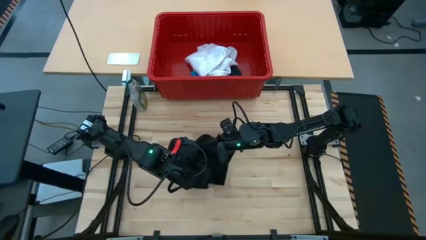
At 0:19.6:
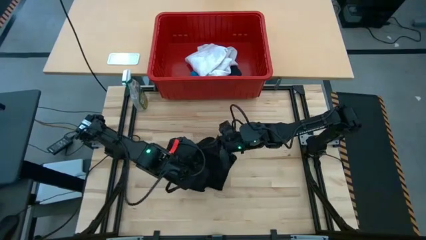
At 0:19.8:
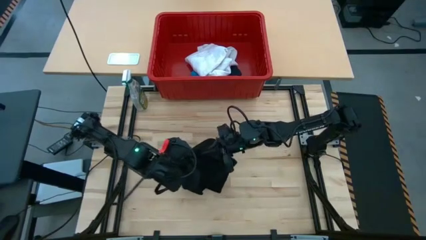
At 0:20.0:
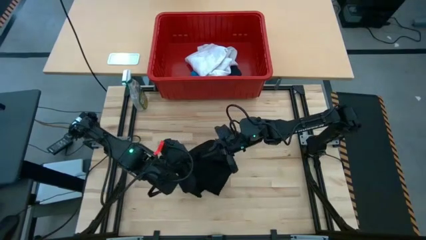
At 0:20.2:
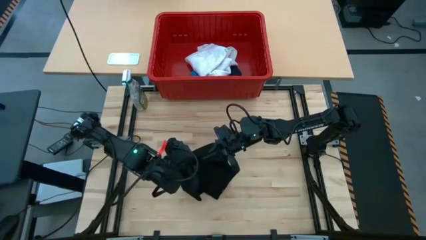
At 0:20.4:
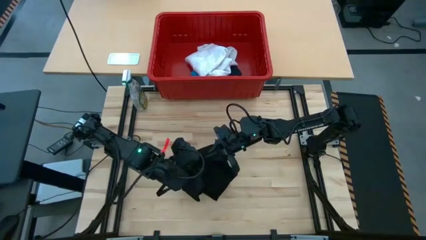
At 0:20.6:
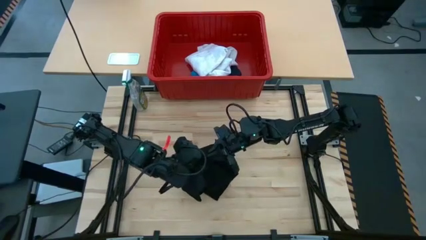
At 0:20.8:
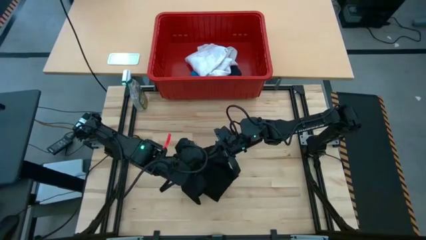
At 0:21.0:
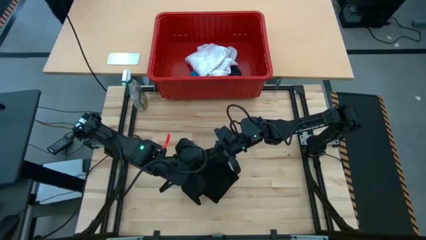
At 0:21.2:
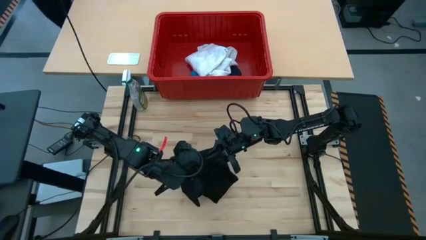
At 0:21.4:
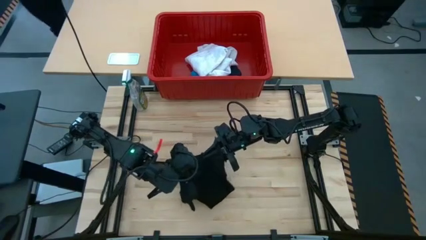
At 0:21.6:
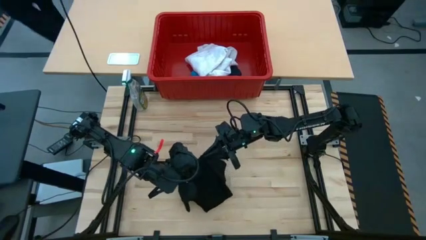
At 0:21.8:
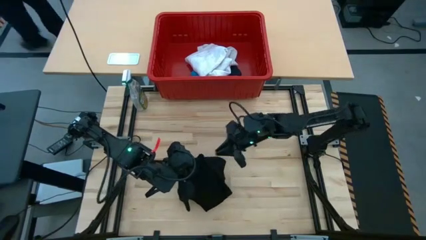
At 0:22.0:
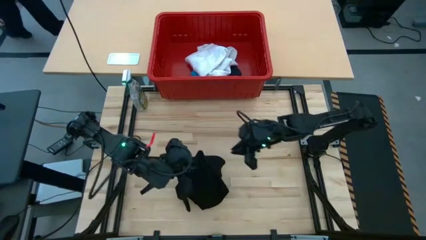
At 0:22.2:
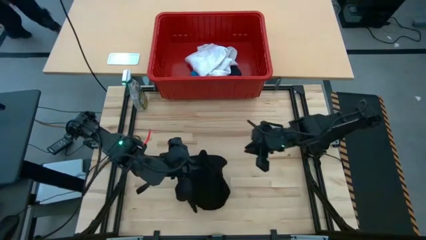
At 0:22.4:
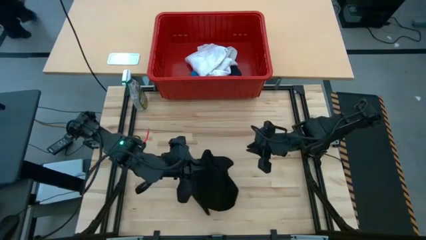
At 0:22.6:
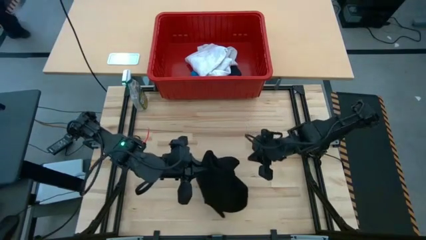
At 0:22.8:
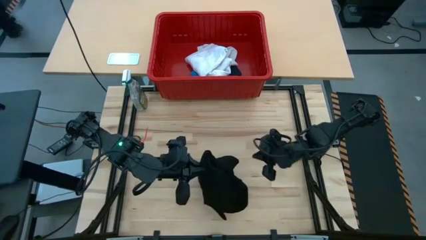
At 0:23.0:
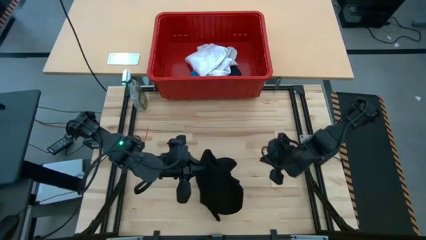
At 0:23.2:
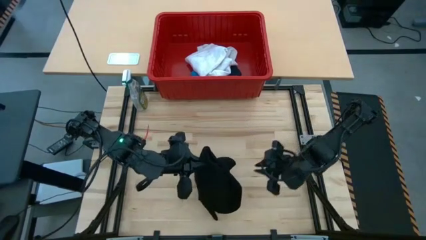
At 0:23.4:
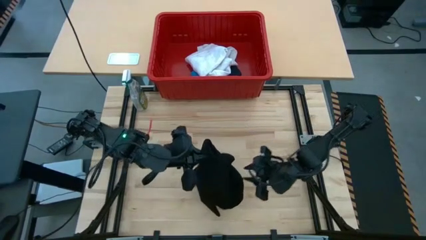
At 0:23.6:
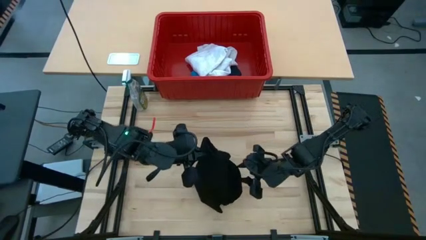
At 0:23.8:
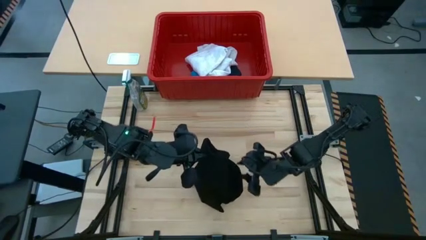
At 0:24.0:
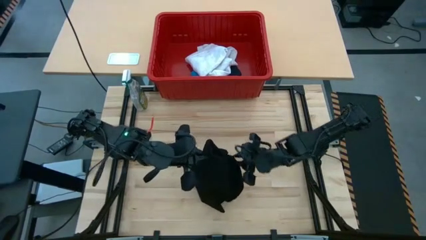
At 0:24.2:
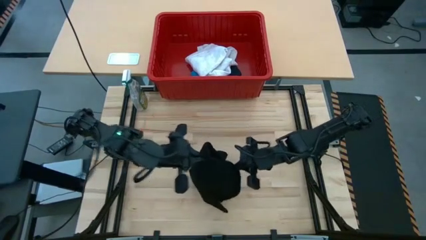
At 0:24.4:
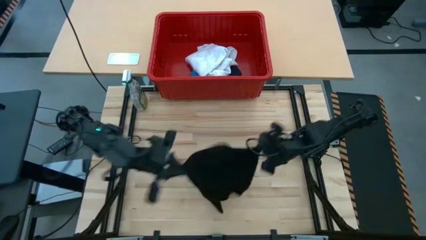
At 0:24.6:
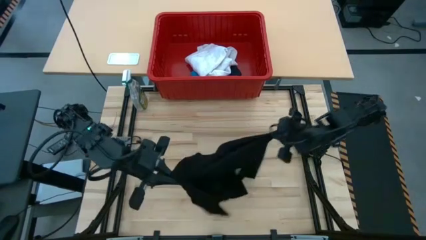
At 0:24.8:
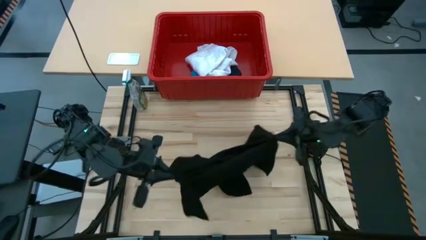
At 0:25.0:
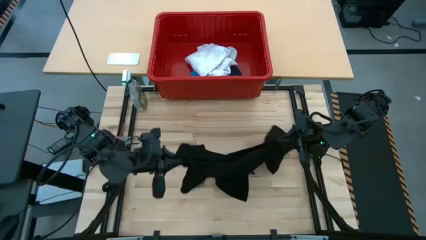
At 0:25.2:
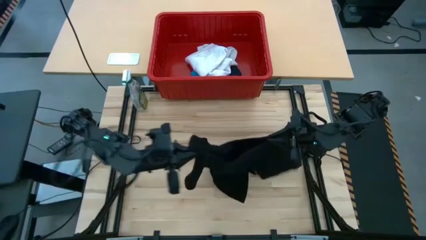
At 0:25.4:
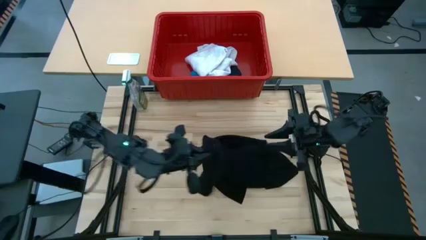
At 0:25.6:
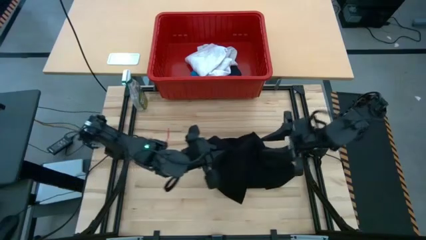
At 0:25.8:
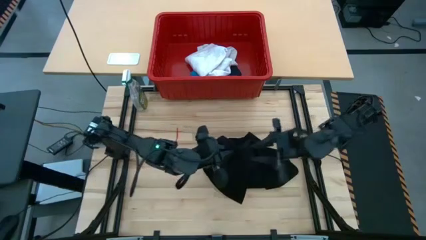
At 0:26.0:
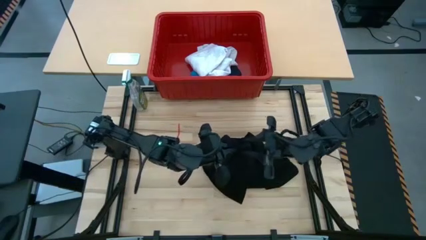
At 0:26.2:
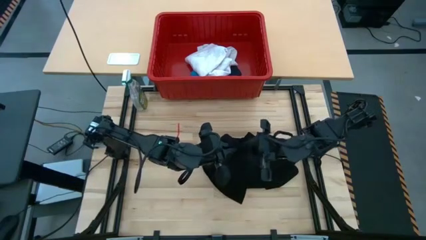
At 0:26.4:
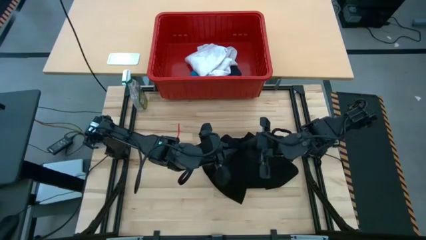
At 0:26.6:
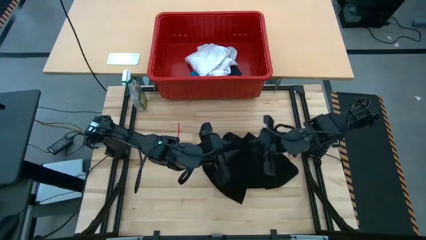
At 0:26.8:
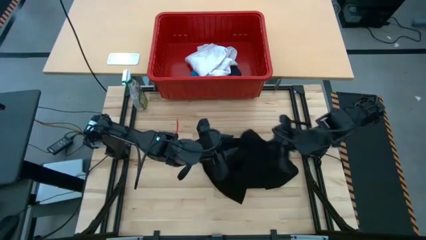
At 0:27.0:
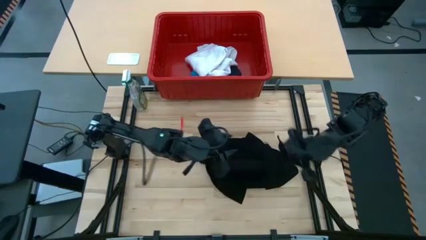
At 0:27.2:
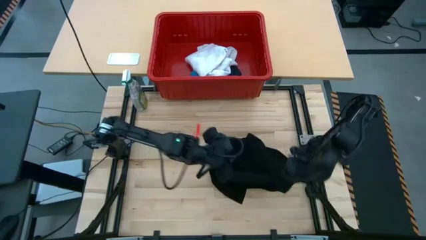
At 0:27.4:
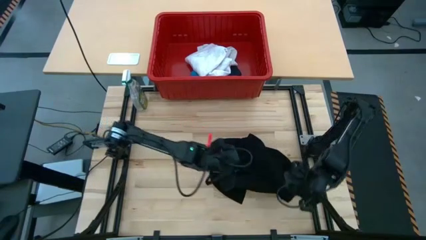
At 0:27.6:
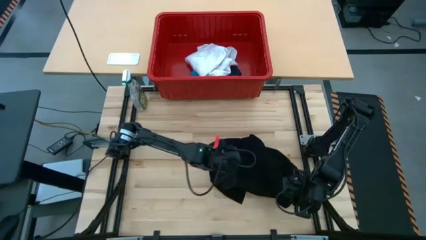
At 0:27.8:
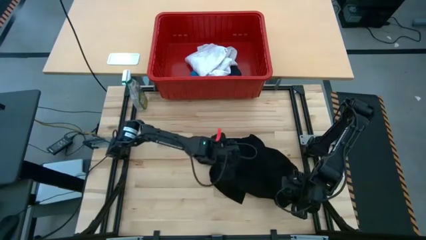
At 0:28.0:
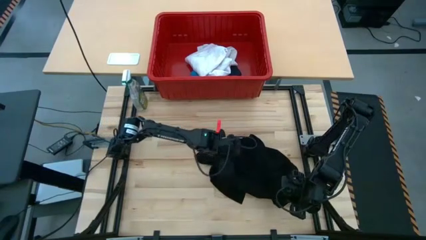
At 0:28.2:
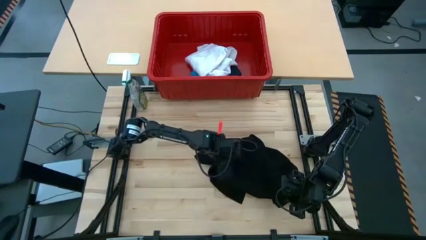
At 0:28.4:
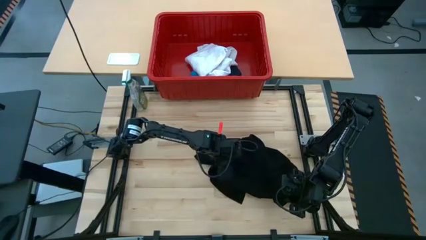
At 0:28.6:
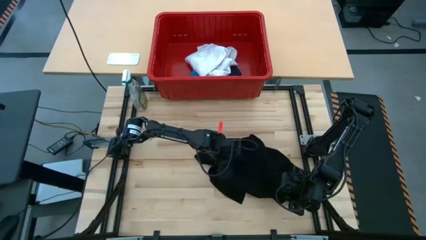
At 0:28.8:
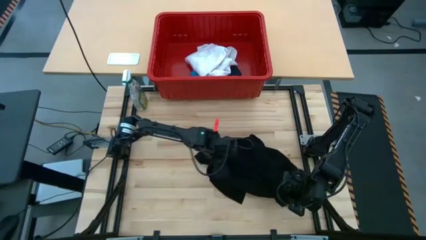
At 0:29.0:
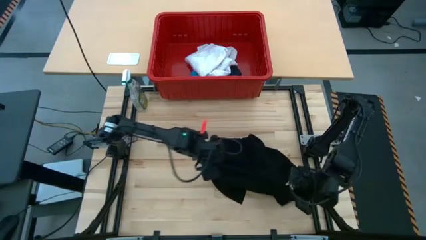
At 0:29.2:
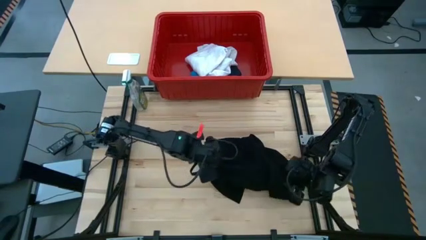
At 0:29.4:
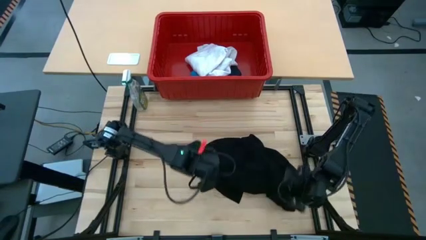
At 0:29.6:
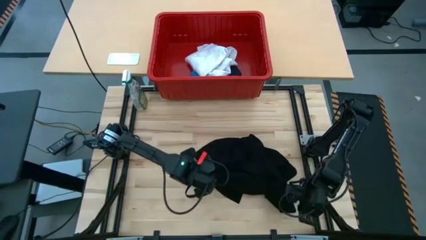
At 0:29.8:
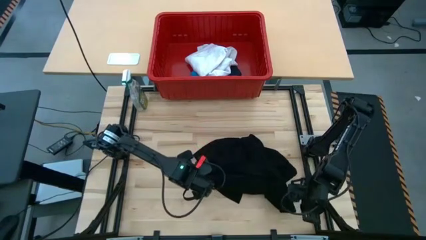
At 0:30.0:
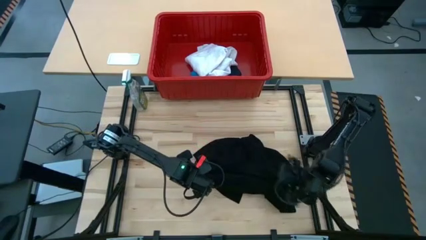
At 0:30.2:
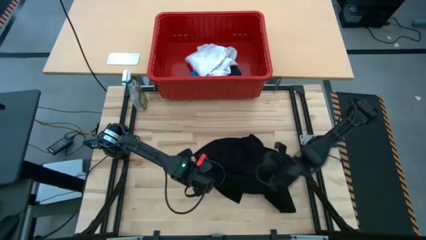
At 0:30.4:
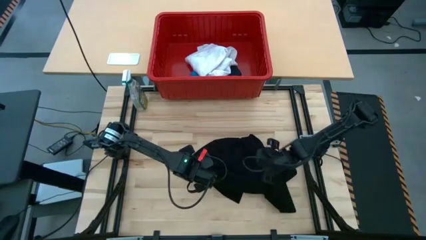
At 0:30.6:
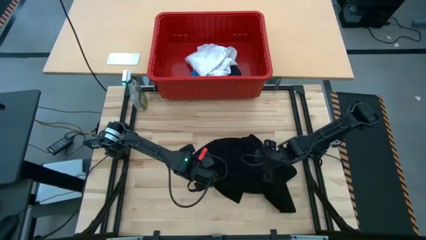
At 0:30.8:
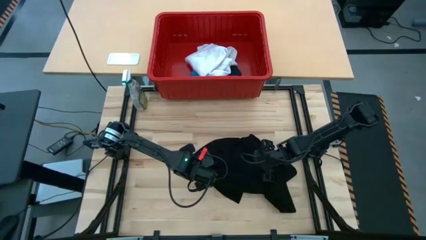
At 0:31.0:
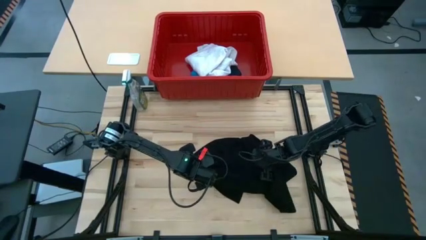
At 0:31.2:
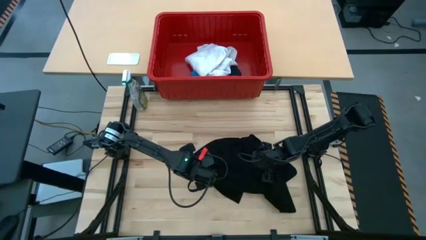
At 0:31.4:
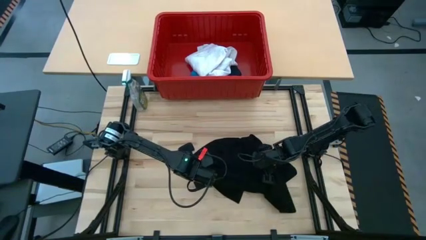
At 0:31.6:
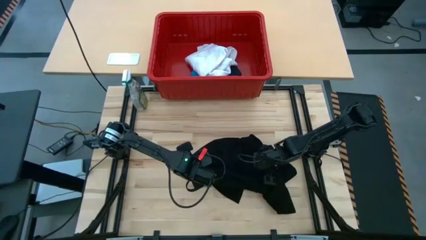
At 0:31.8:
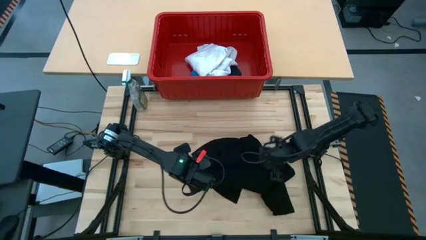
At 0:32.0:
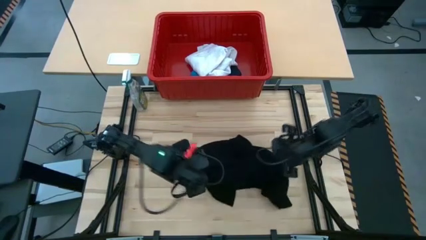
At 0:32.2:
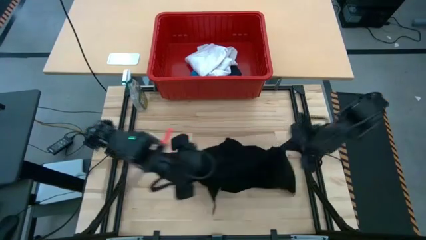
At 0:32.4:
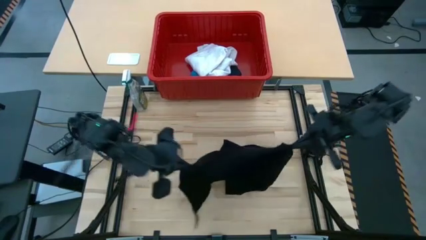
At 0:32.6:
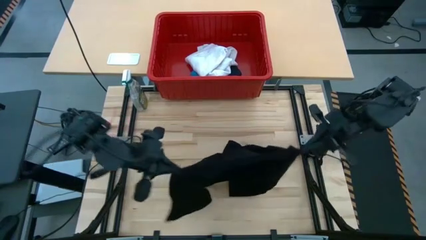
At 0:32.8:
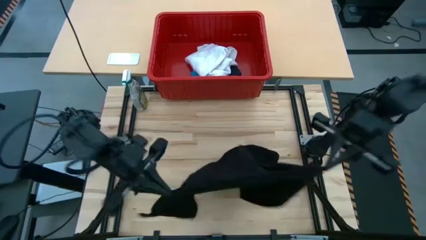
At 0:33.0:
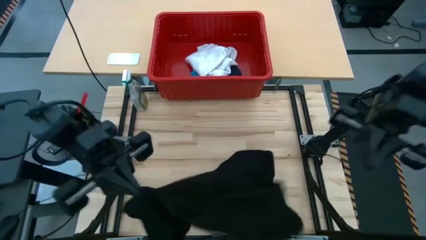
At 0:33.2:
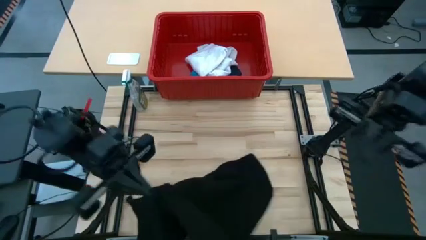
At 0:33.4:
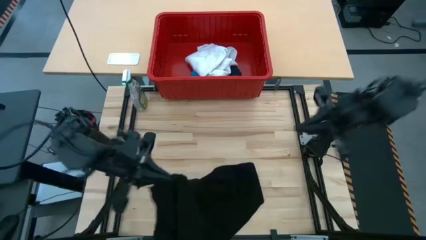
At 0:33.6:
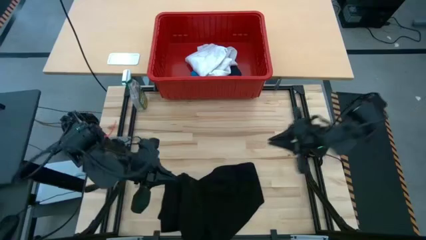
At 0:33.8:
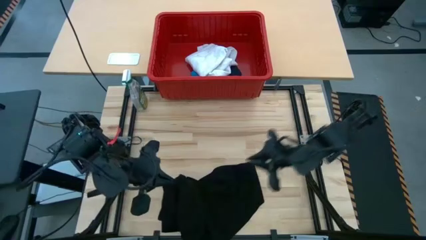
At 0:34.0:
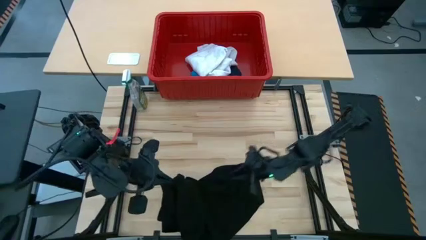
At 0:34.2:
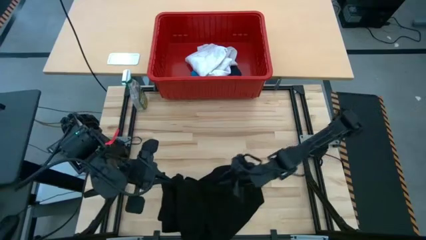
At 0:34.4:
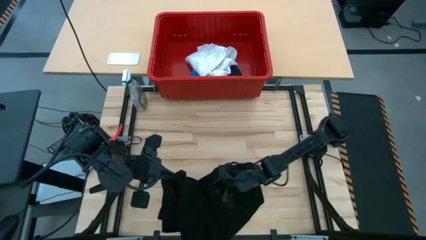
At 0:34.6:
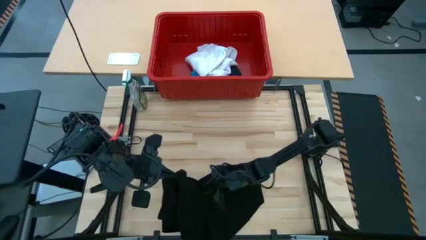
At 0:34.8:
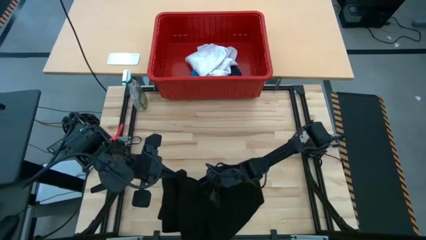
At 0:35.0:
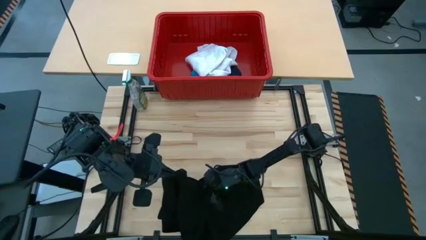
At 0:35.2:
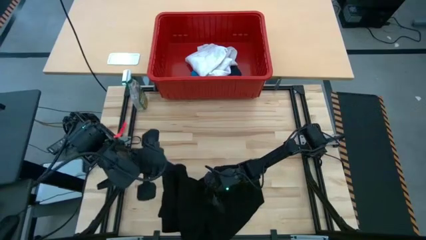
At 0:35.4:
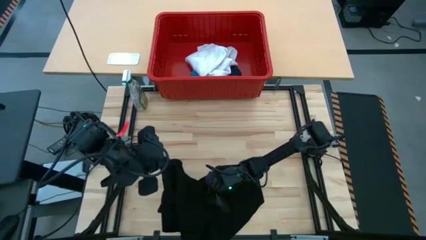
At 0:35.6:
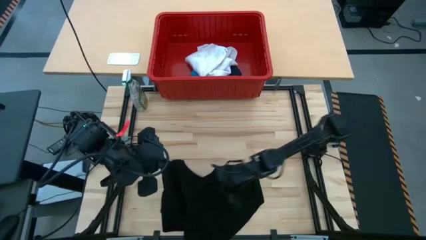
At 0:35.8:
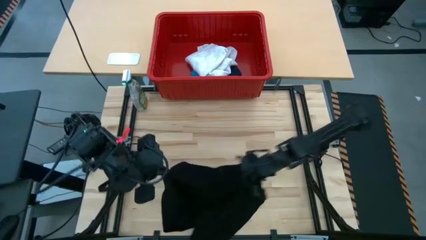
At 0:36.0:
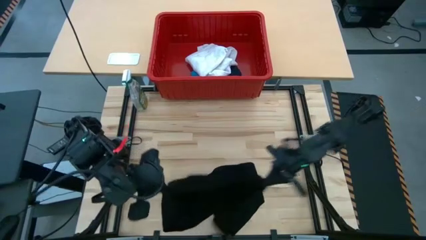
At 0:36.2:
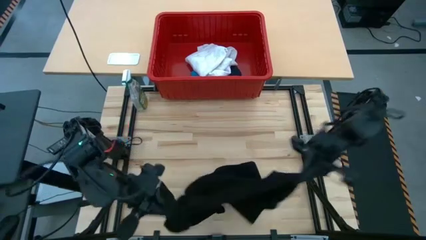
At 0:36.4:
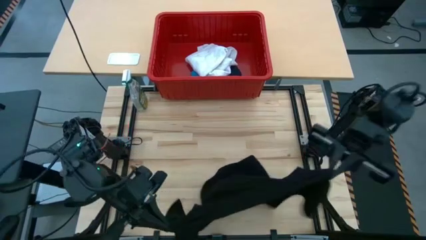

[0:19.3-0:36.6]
Task: Fold laundry
Fold the black shirt on the table
